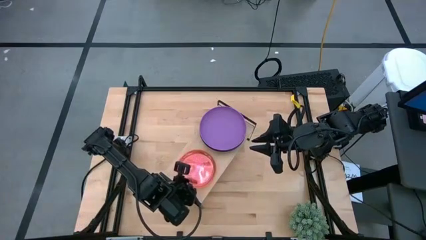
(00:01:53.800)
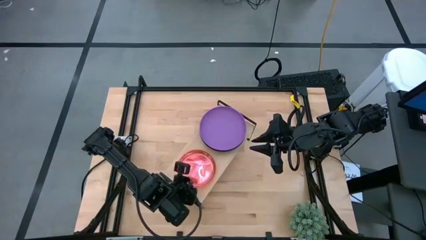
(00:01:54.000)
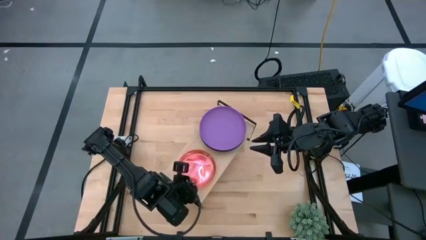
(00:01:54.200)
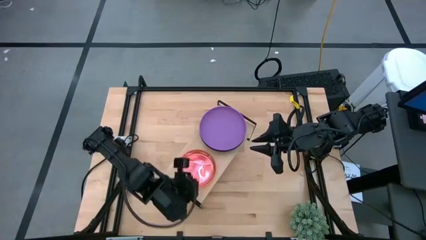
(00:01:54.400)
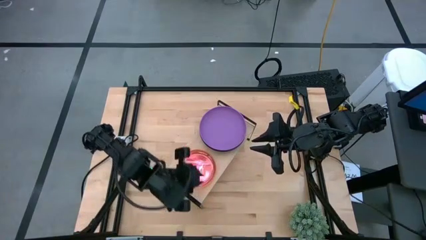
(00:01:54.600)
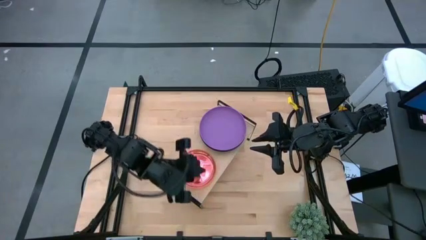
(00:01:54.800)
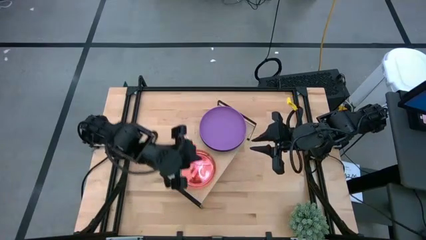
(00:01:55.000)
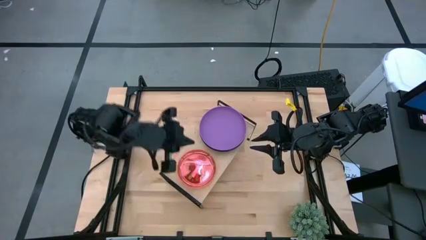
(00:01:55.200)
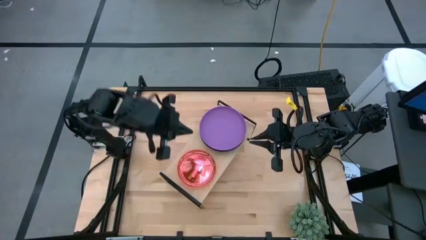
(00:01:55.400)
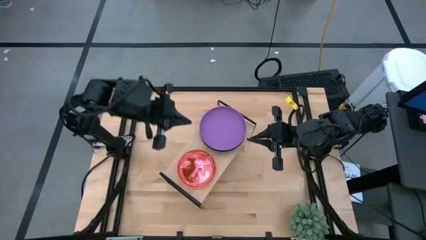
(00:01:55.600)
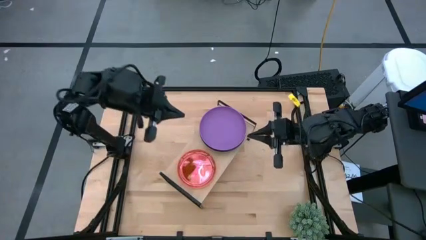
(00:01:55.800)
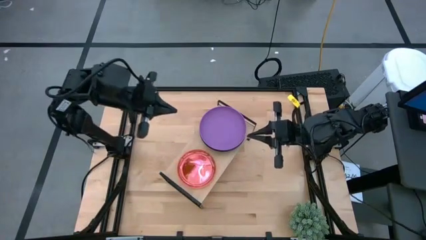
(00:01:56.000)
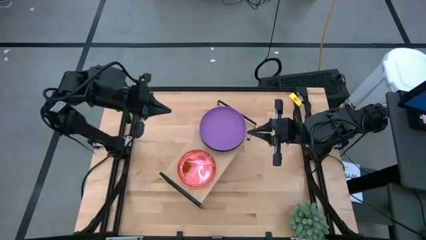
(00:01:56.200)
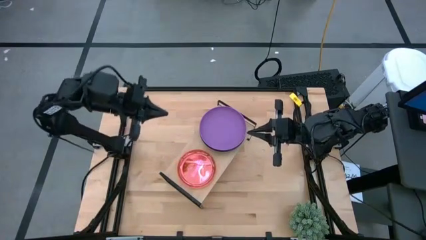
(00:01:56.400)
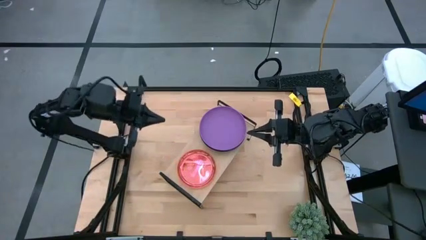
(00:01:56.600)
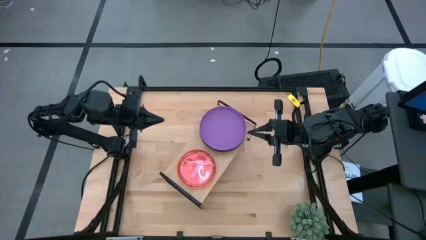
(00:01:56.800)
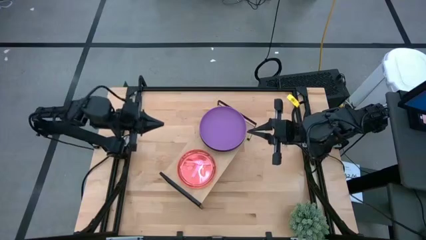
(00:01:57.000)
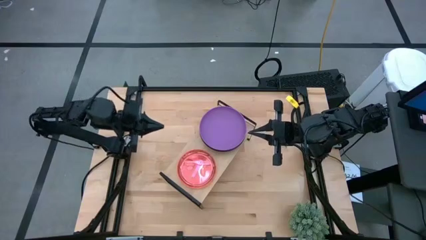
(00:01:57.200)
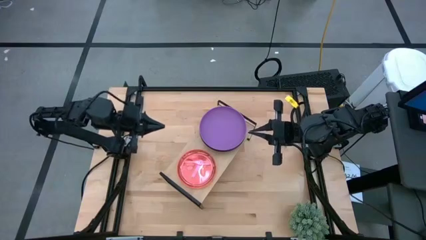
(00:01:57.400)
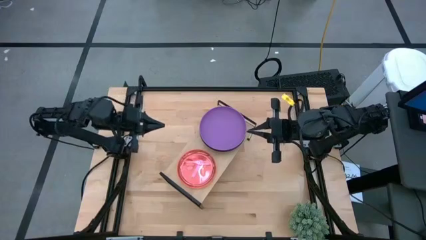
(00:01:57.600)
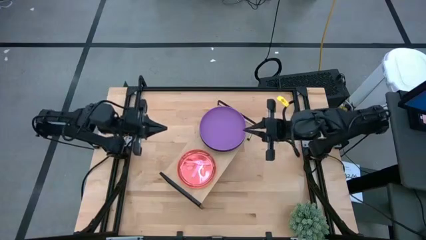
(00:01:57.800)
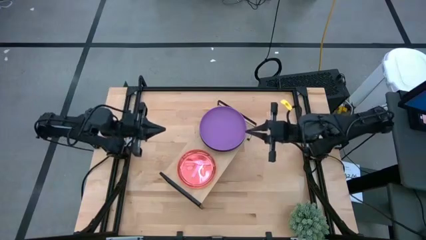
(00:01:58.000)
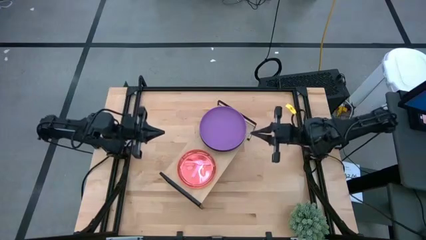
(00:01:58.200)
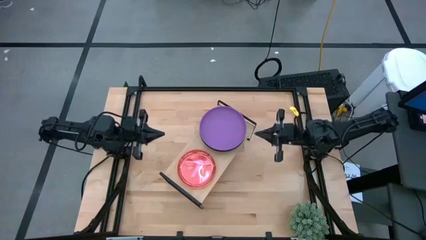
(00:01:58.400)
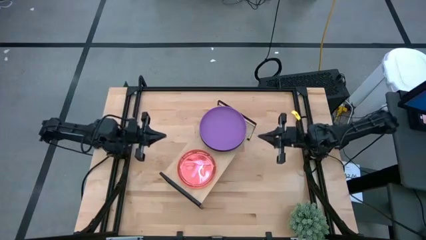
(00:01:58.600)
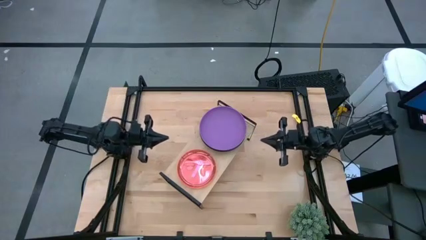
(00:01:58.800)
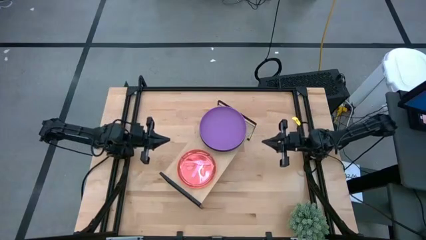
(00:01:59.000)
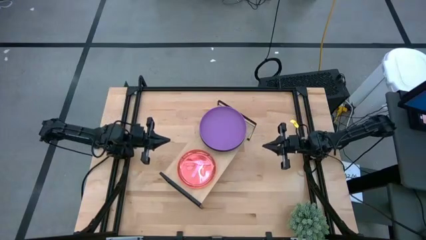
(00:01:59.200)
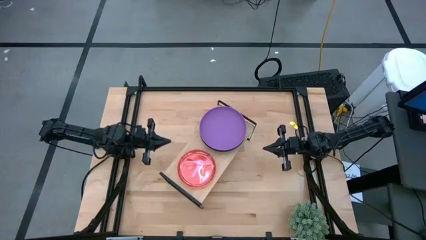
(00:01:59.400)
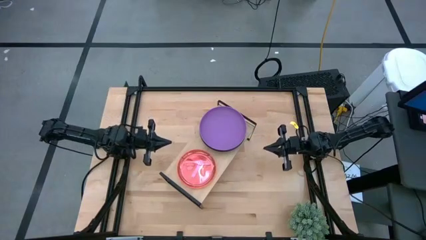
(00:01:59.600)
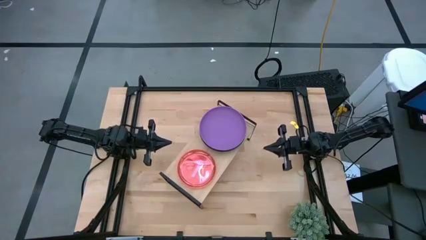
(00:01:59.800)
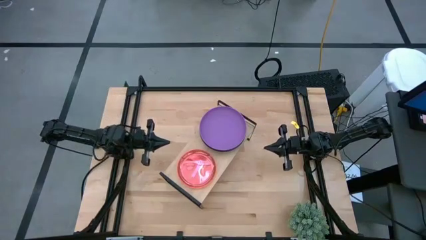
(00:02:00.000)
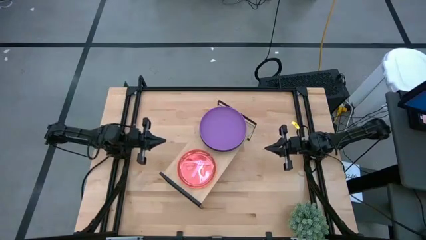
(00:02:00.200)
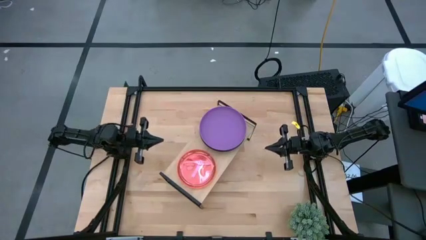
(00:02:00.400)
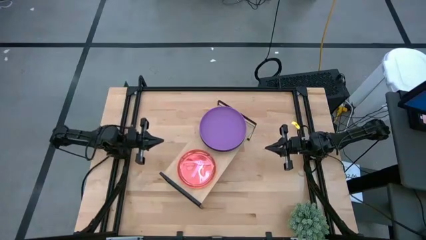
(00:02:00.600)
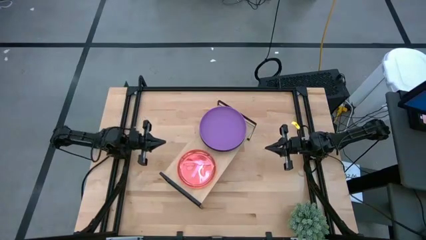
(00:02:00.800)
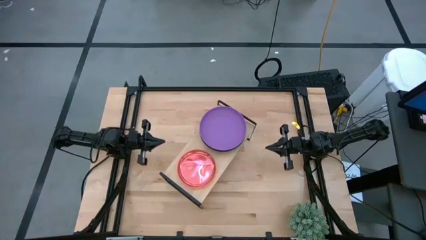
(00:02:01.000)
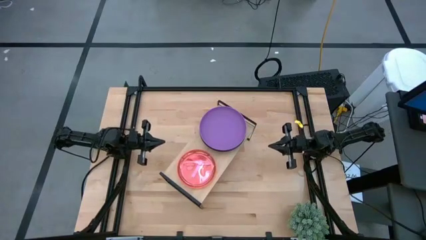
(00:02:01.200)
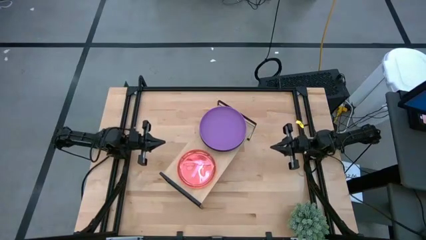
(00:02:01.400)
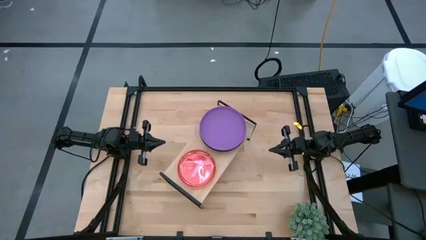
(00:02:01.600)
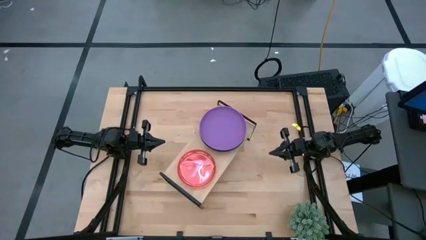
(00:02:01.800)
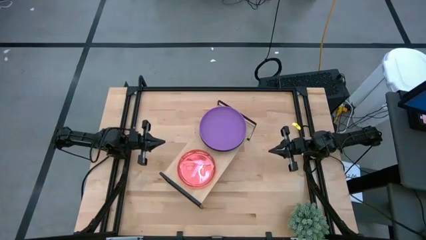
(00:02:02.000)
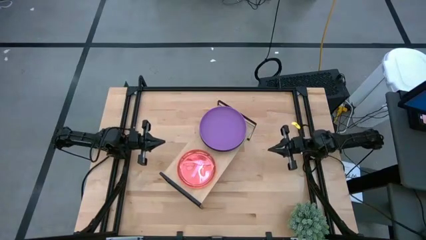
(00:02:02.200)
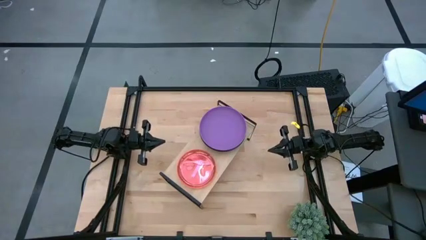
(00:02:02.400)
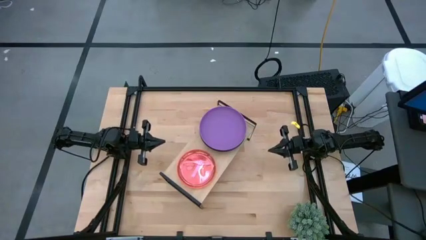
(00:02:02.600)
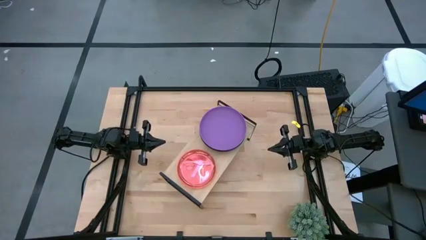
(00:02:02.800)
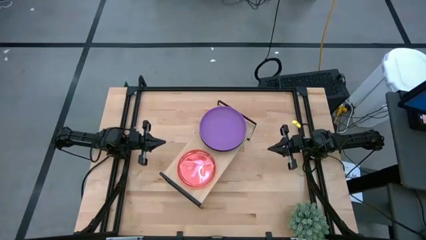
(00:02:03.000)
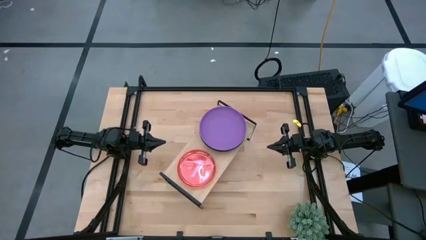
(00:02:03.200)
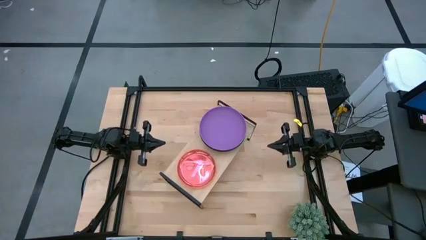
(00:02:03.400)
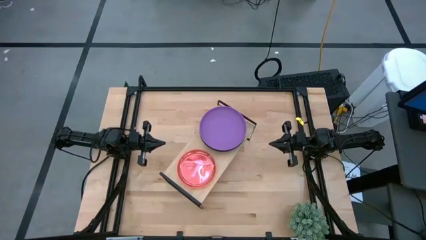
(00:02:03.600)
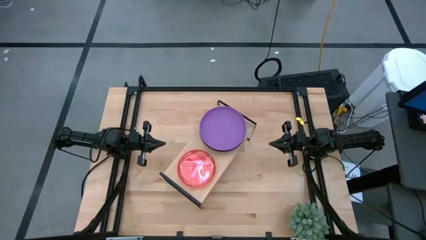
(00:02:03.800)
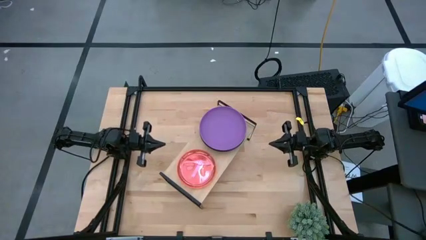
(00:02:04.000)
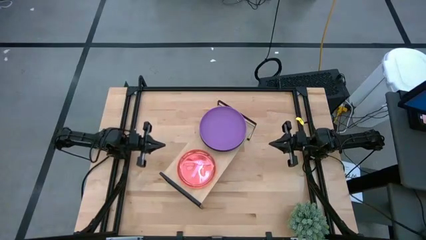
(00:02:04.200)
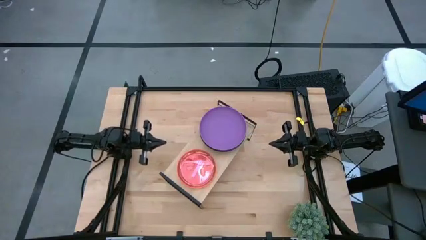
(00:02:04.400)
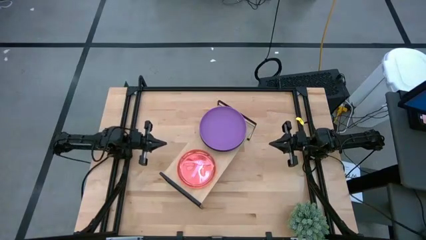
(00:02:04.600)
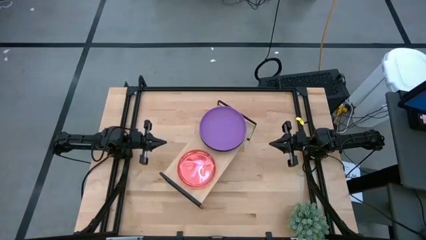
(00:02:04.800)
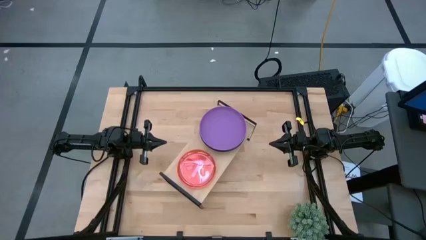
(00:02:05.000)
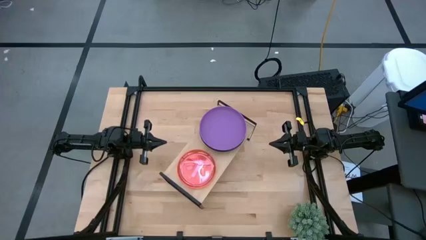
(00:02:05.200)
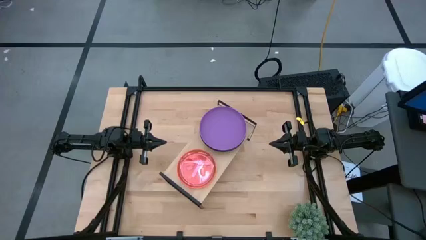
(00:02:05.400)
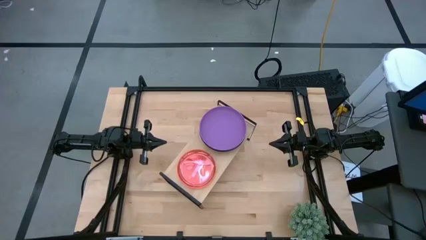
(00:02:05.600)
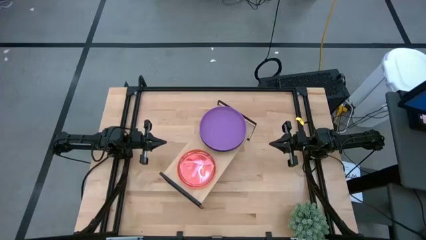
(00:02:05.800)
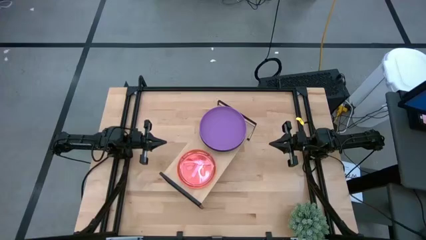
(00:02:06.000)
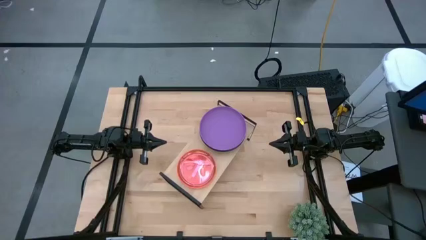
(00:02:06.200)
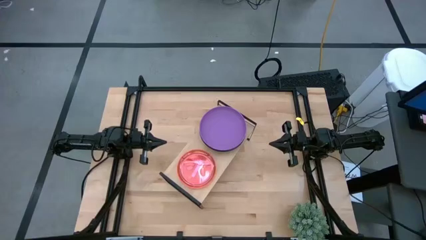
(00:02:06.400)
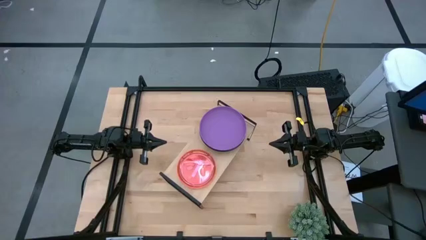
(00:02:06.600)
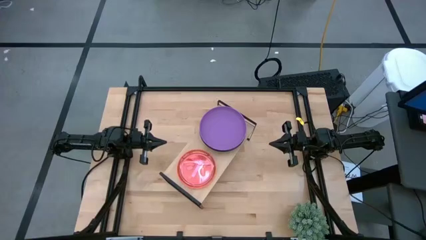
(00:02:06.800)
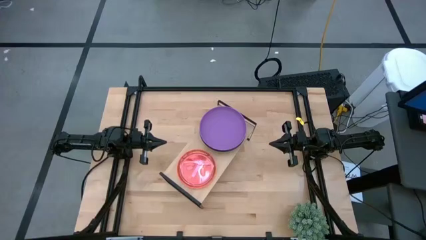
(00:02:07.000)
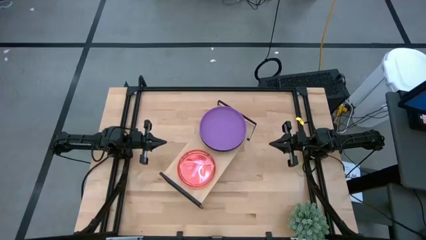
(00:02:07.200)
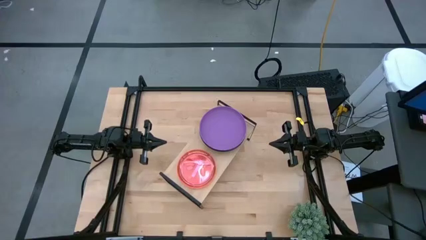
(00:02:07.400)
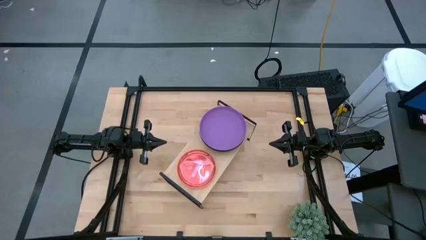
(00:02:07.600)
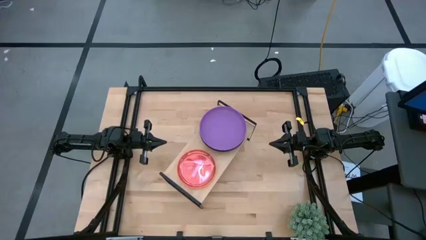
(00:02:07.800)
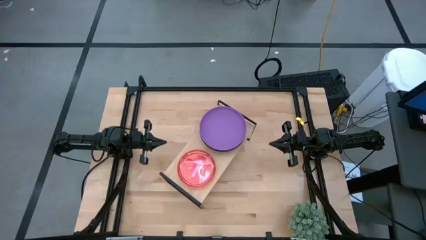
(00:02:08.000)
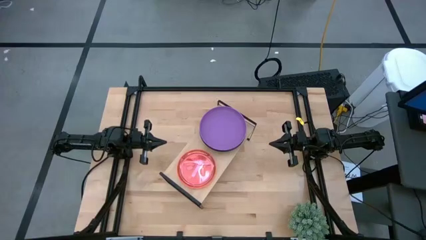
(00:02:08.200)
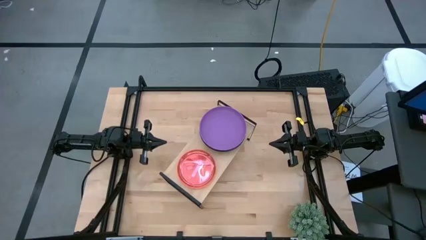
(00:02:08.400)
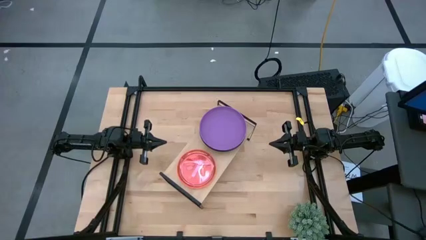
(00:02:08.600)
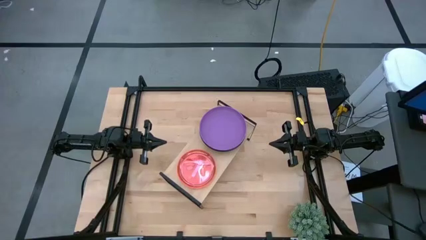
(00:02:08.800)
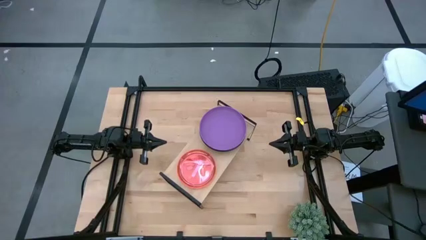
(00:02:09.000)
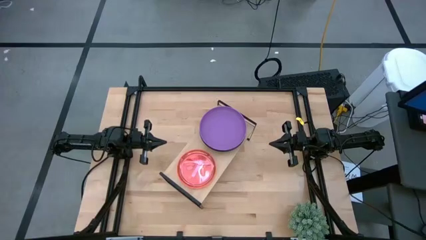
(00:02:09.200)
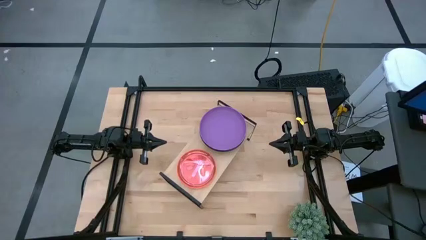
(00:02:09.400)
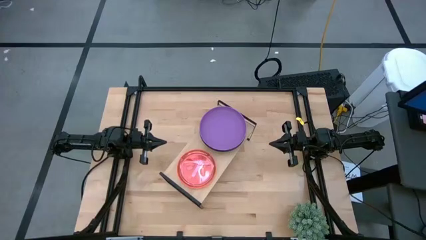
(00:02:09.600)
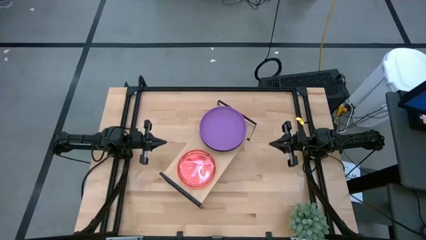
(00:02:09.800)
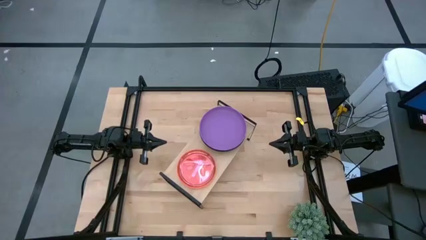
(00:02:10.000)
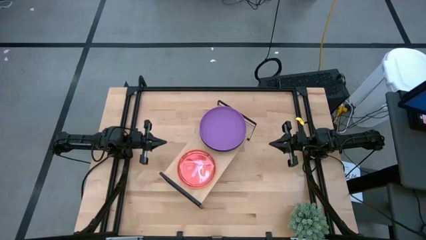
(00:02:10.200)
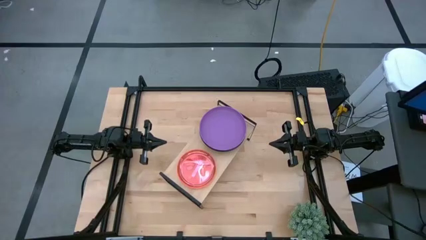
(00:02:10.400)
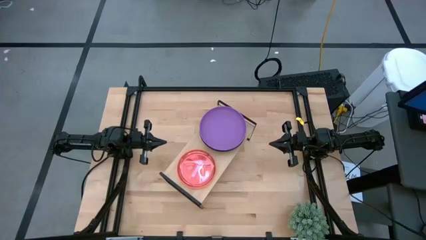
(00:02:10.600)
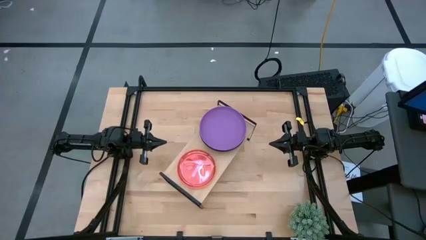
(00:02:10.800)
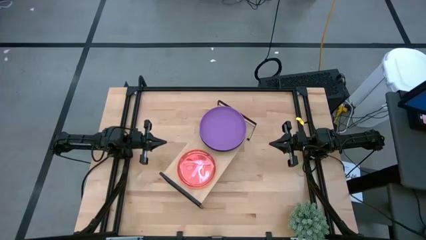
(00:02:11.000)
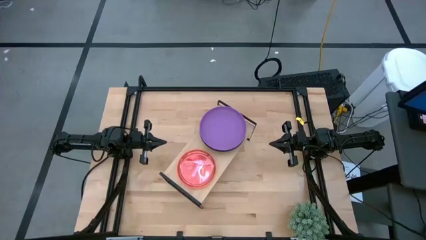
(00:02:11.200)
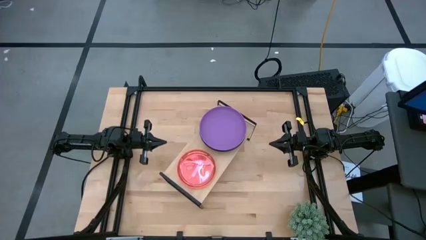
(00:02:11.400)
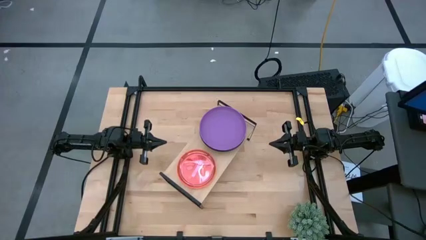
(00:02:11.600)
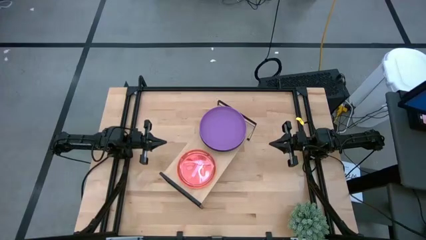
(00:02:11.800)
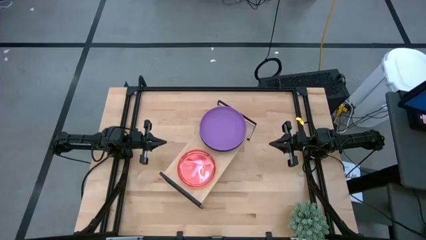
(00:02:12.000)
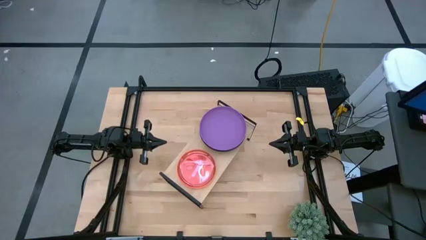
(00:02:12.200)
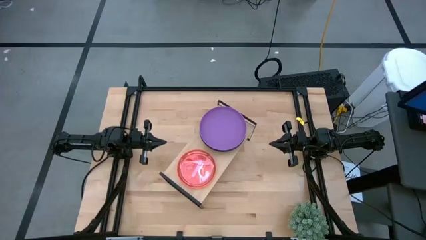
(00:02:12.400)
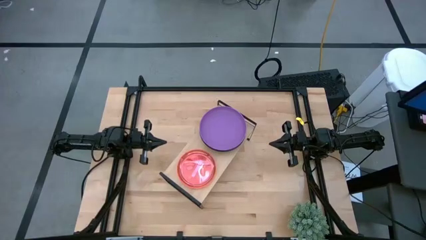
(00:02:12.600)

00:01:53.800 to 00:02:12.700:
Task: Place and stack plates onto a shelf
Return to Home Position
